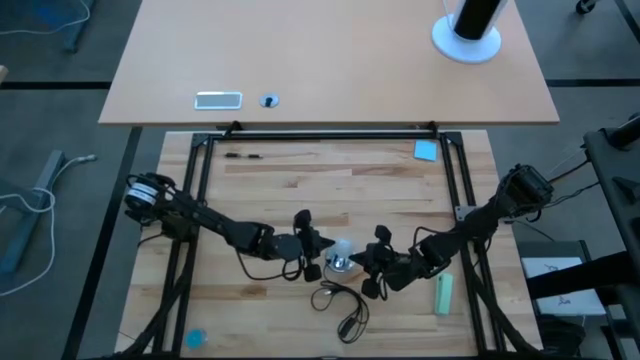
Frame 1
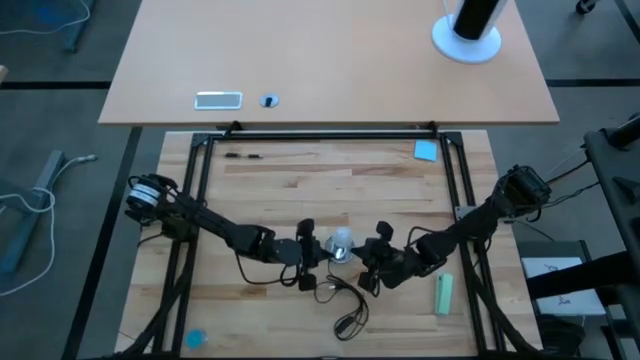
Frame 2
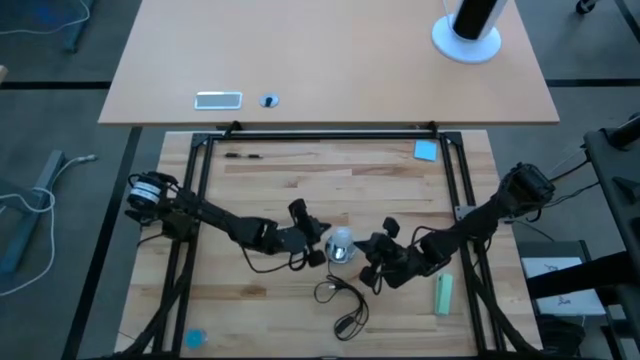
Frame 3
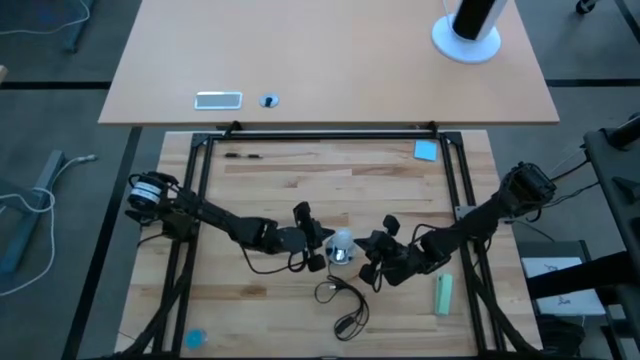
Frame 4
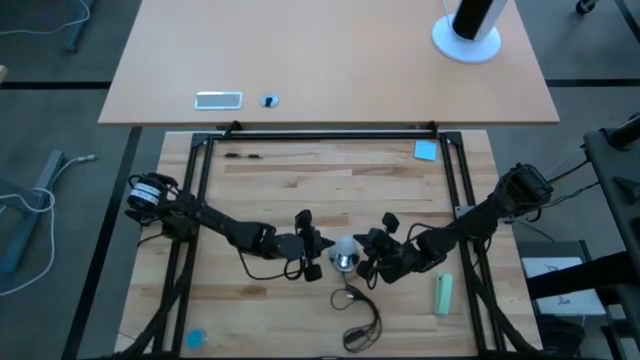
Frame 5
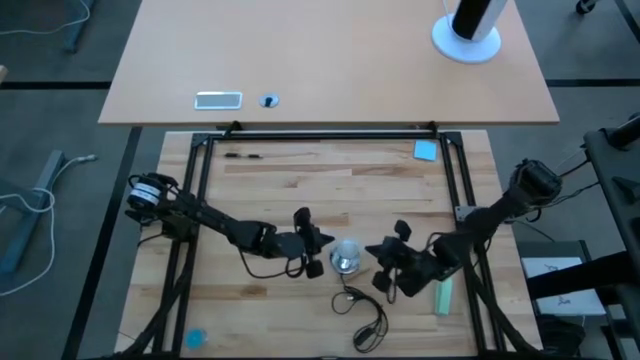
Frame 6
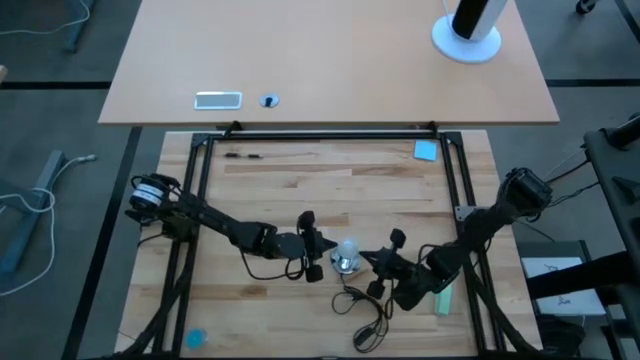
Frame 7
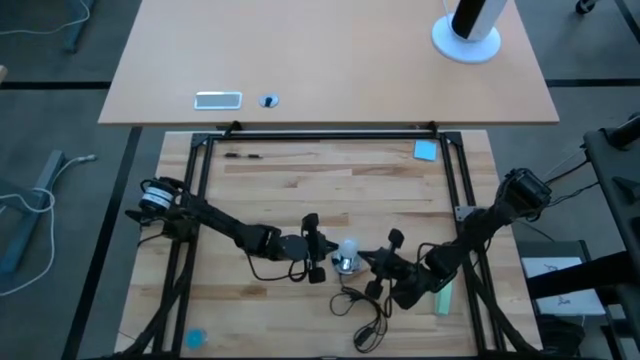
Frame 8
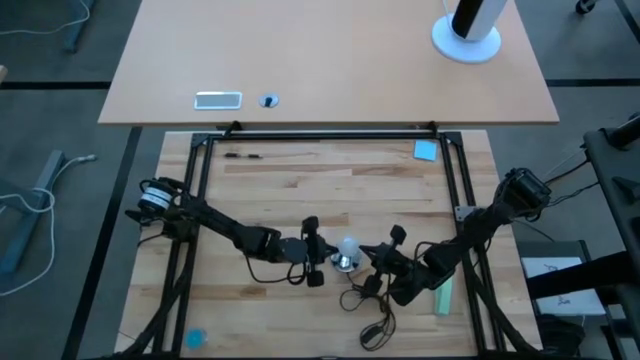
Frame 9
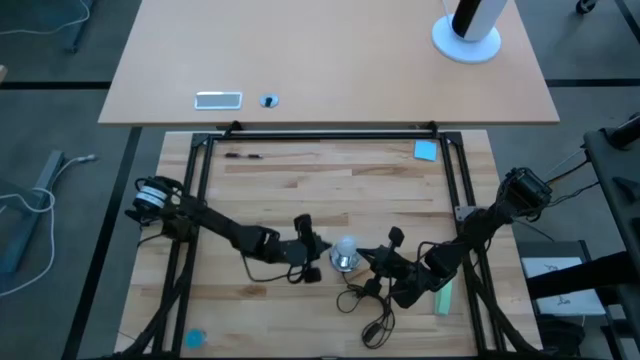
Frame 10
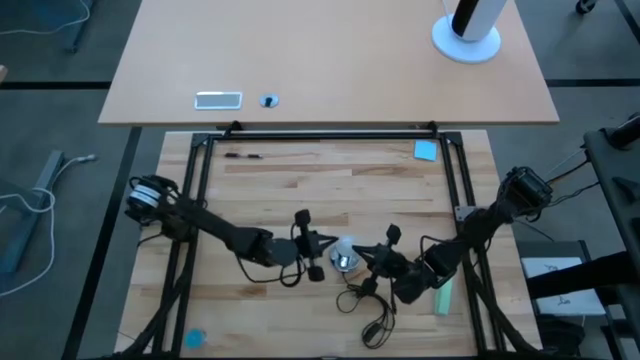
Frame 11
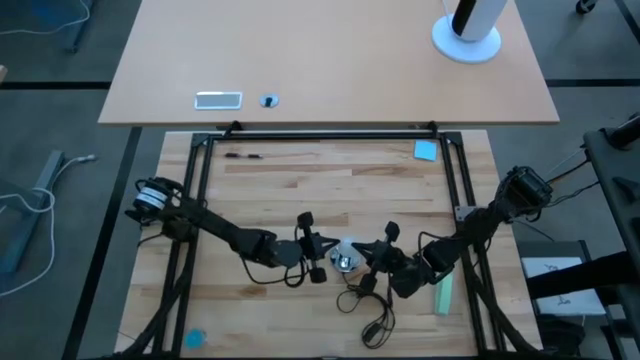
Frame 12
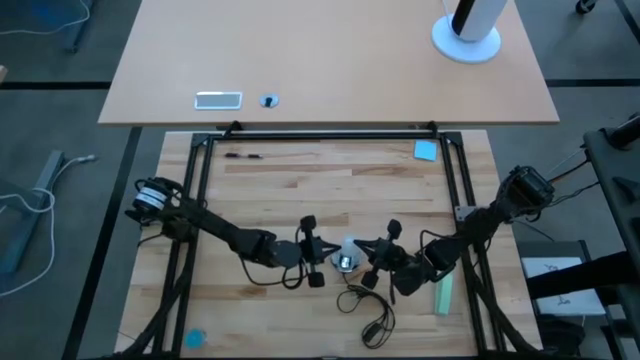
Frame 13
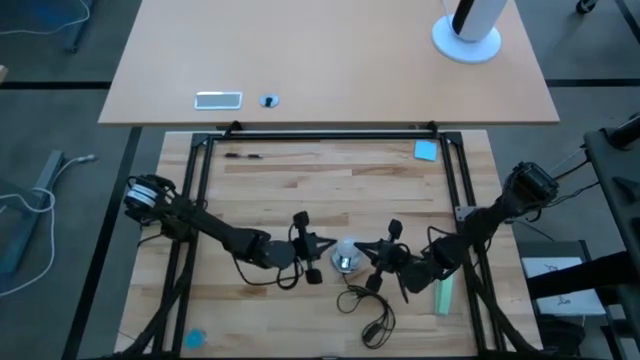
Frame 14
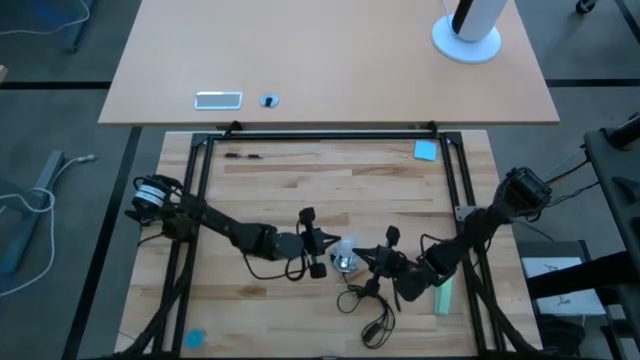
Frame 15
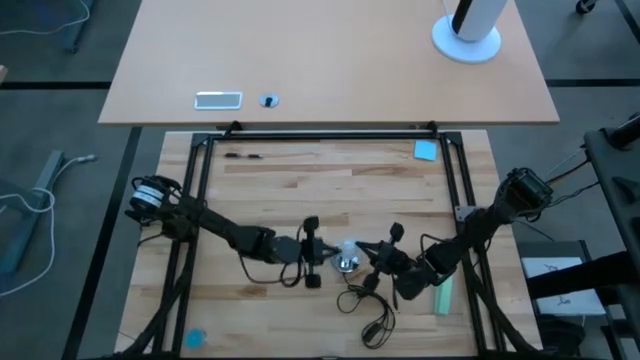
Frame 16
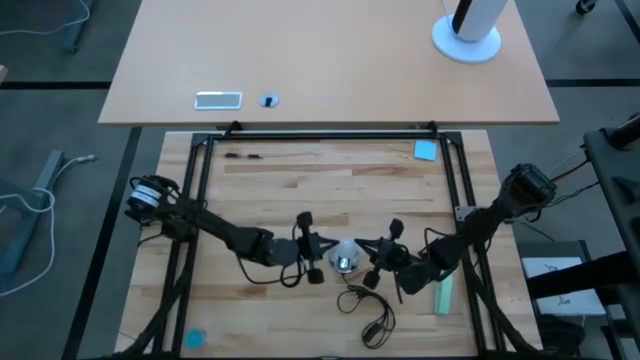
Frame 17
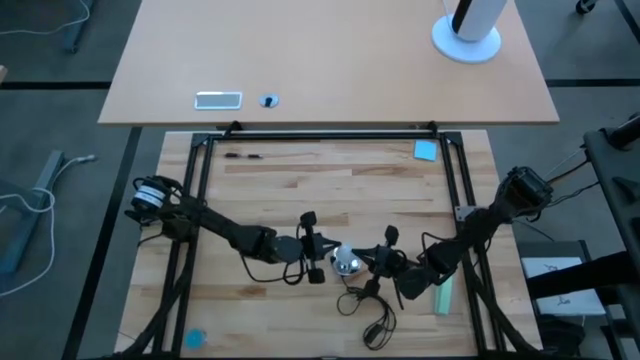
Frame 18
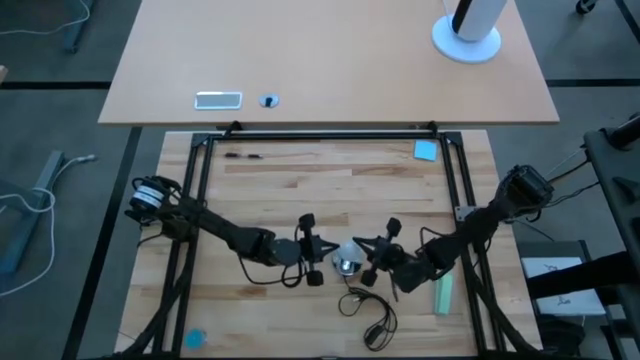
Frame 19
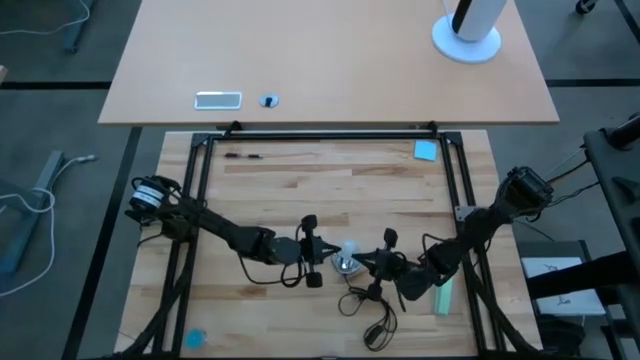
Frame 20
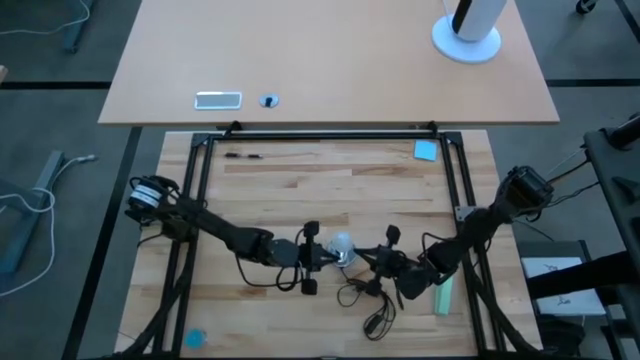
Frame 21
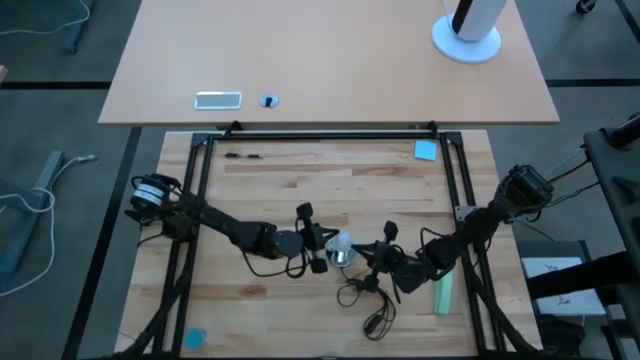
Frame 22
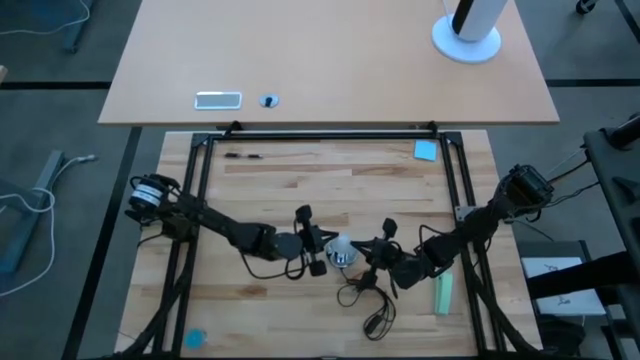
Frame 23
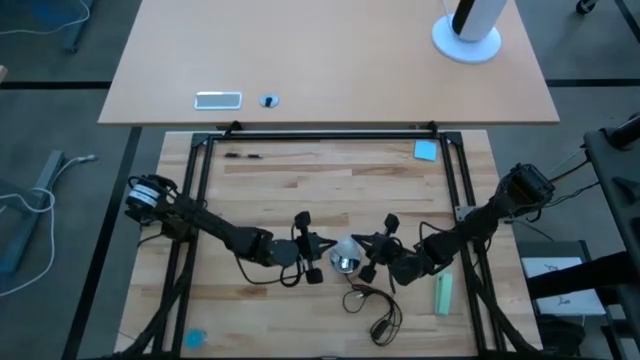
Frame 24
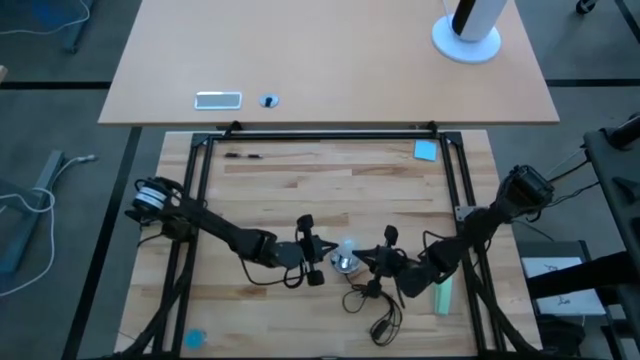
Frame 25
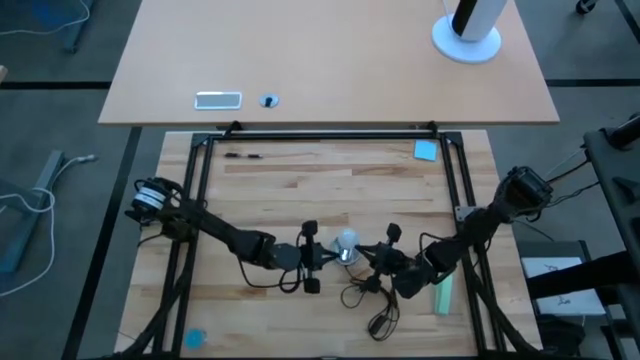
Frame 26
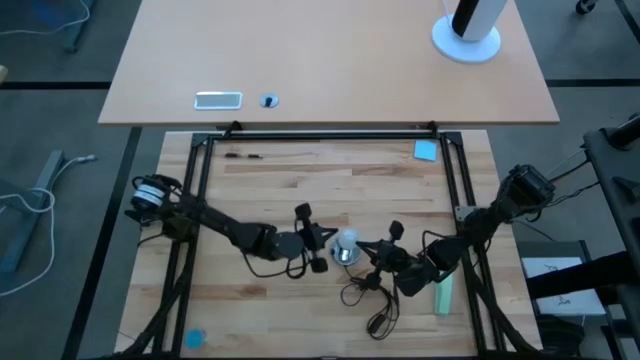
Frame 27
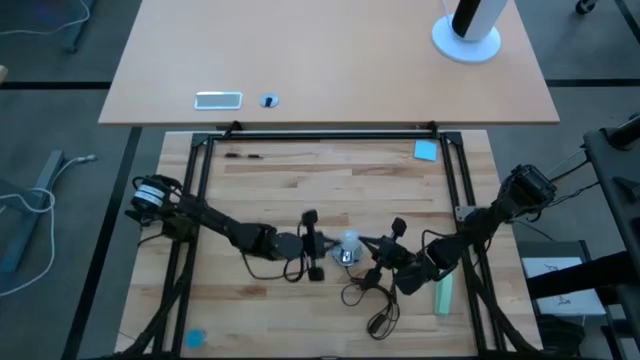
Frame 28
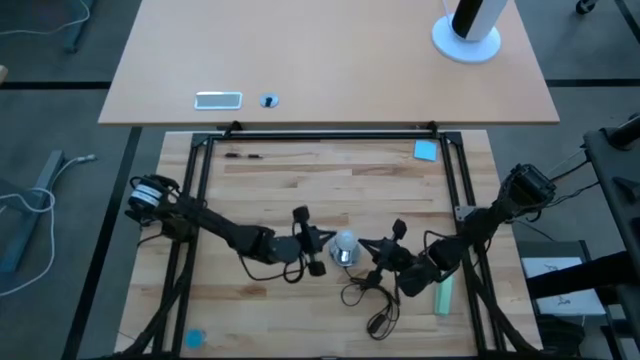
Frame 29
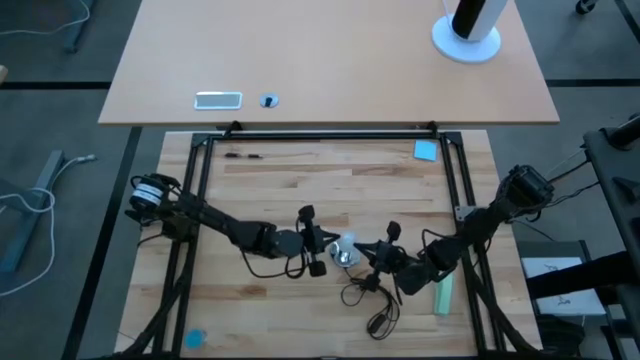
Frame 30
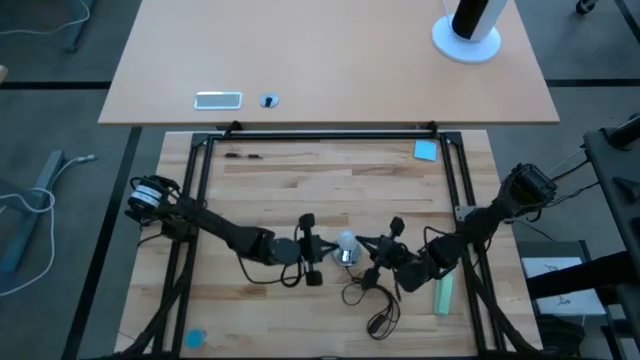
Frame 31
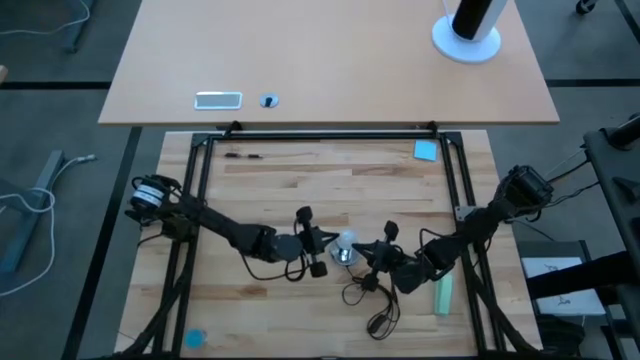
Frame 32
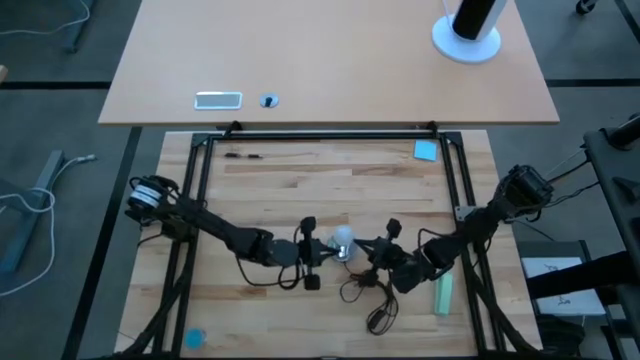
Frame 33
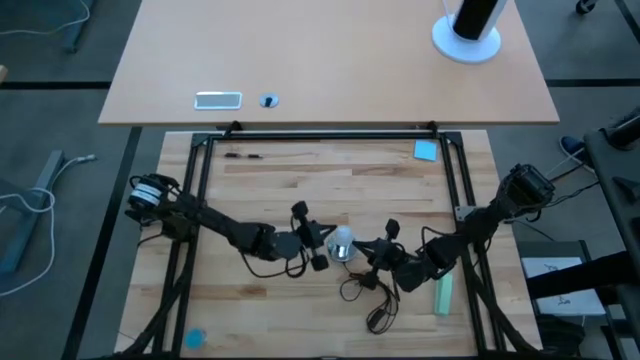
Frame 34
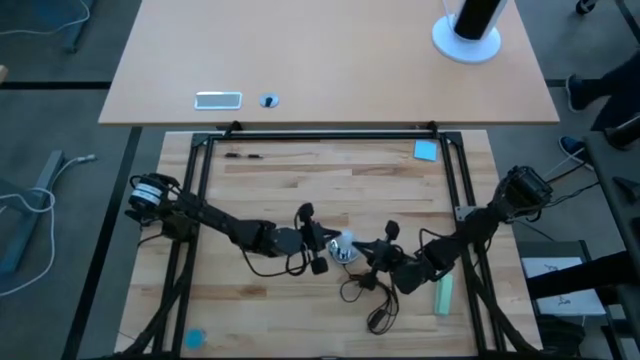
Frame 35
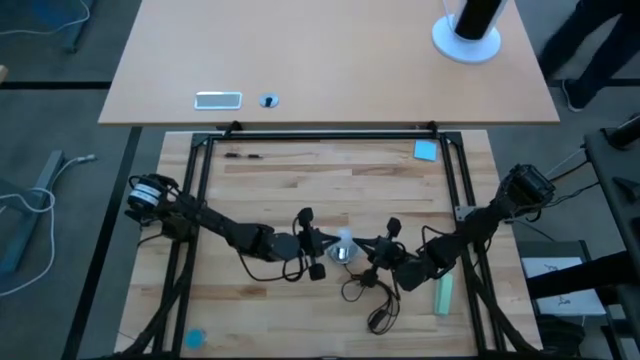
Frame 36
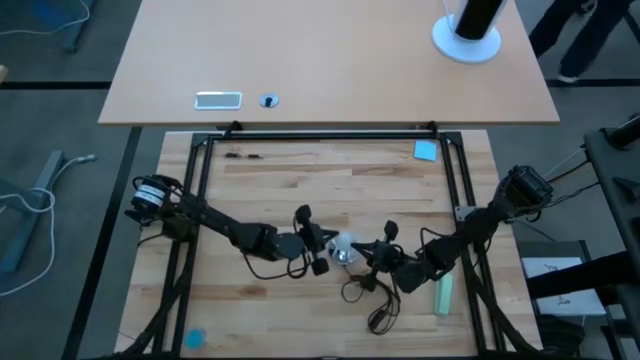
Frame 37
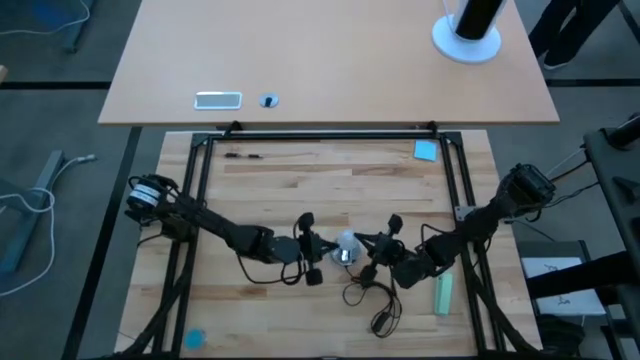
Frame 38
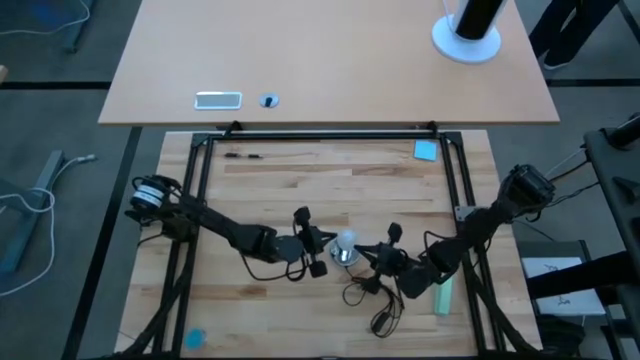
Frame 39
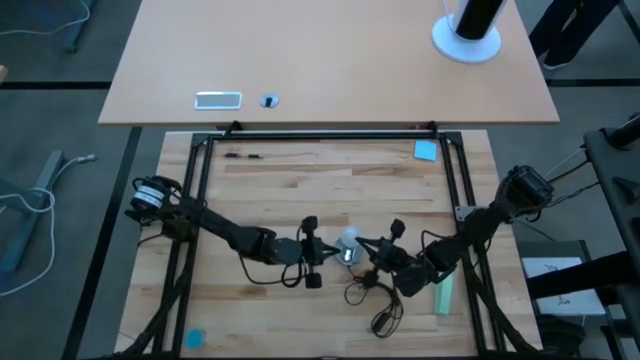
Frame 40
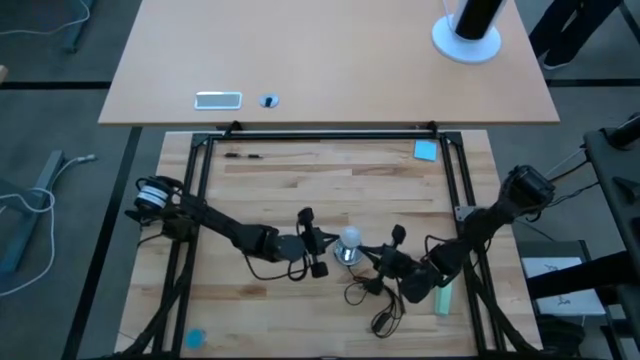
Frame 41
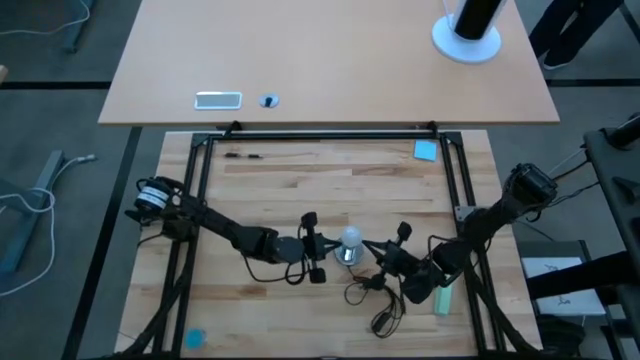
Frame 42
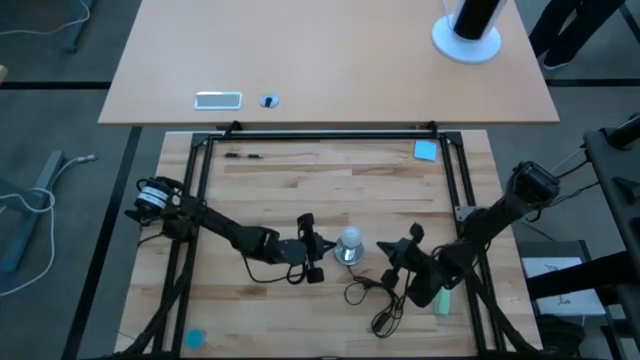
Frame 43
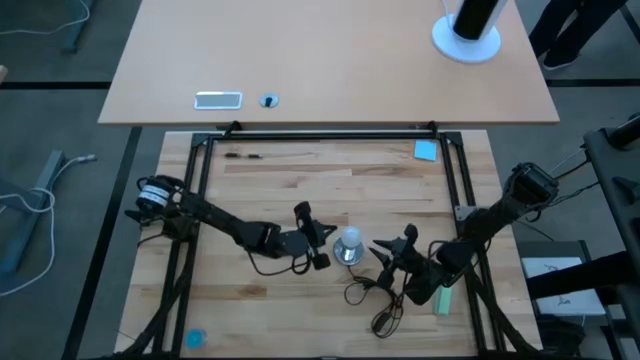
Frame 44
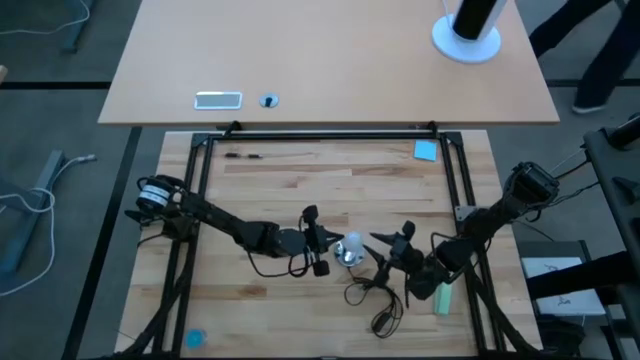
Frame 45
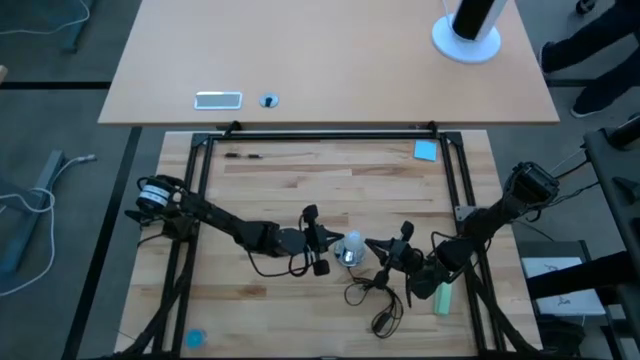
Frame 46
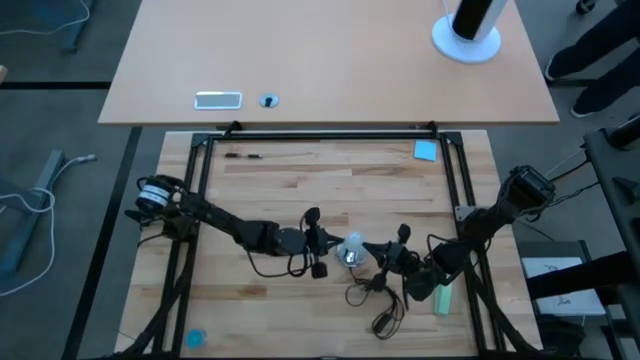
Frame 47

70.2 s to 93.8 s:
Task: Screw lightbulb
Remove the lightbulb from the lamp
